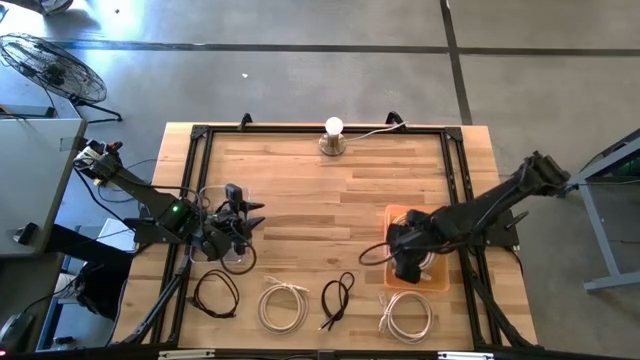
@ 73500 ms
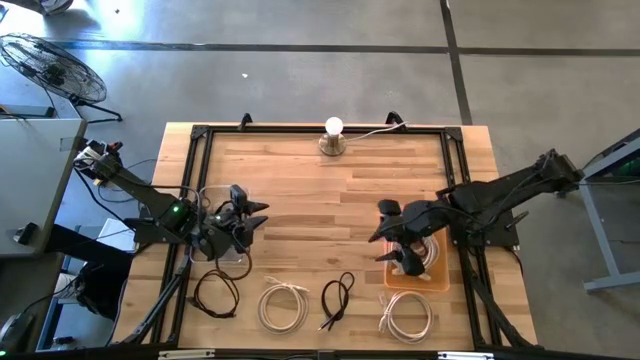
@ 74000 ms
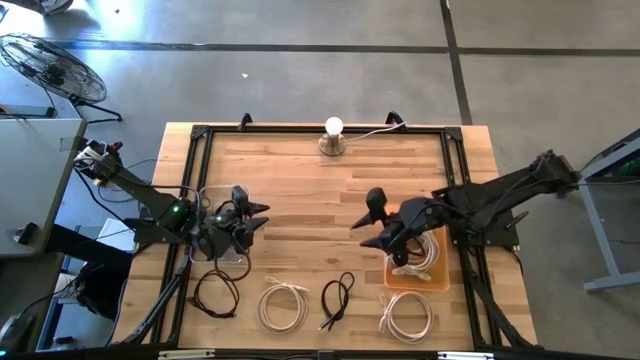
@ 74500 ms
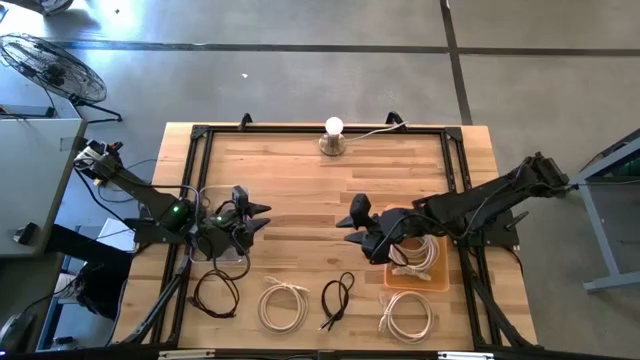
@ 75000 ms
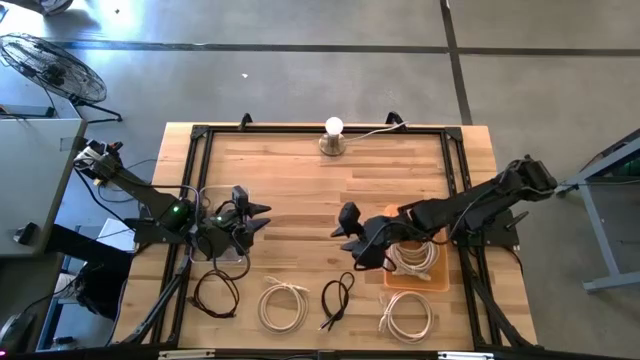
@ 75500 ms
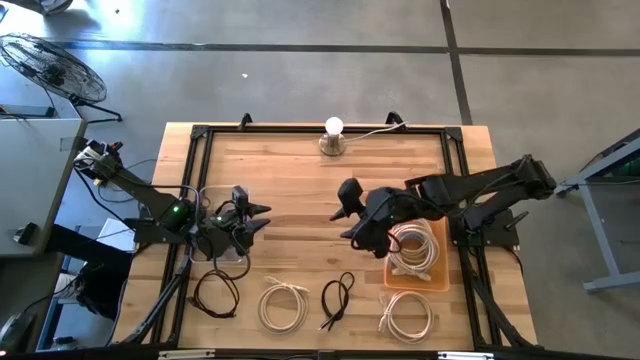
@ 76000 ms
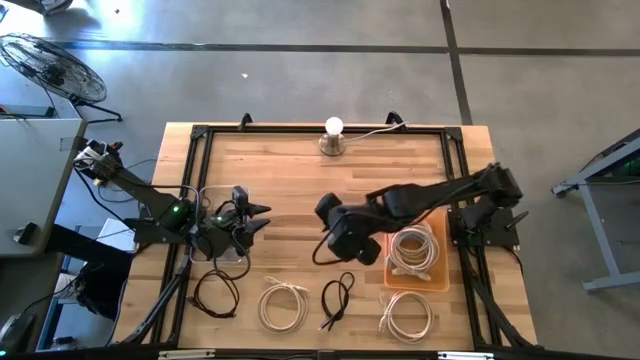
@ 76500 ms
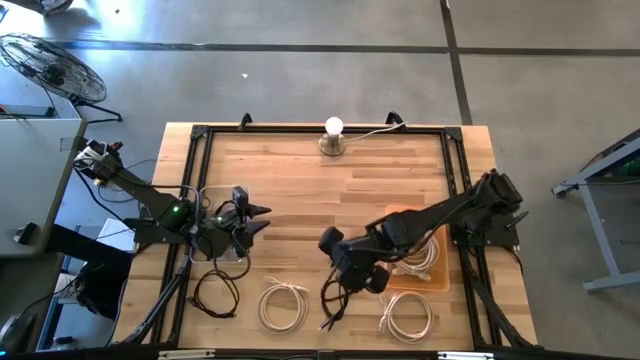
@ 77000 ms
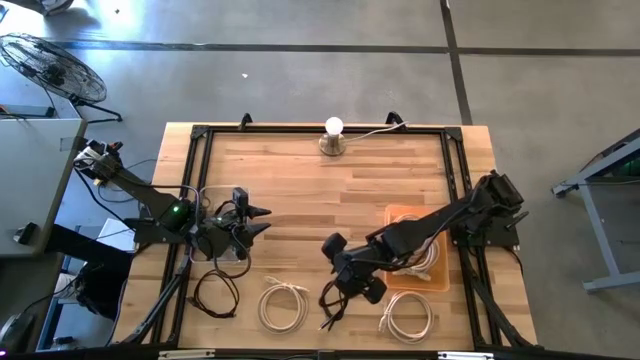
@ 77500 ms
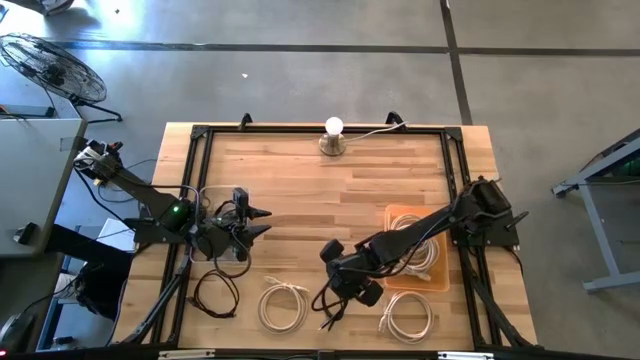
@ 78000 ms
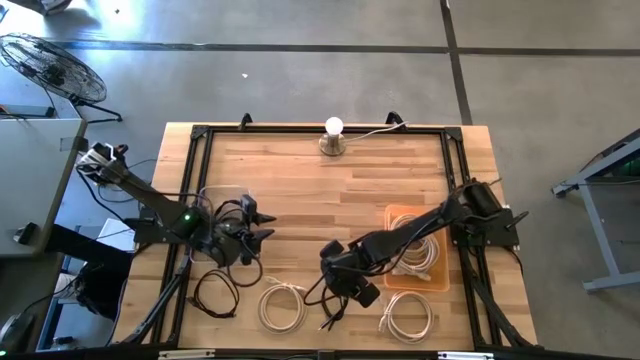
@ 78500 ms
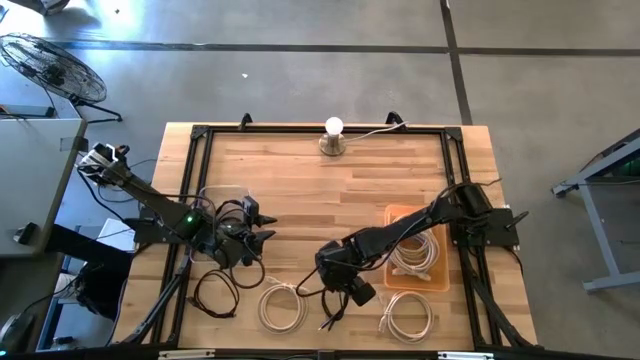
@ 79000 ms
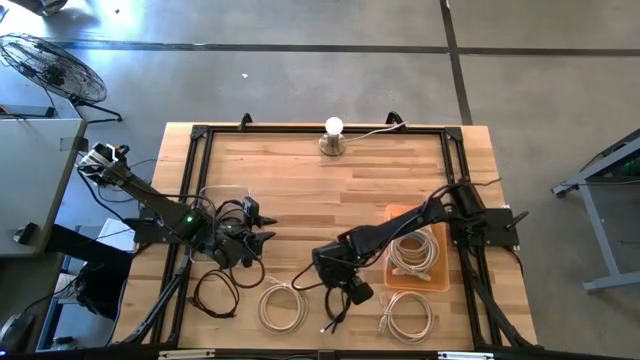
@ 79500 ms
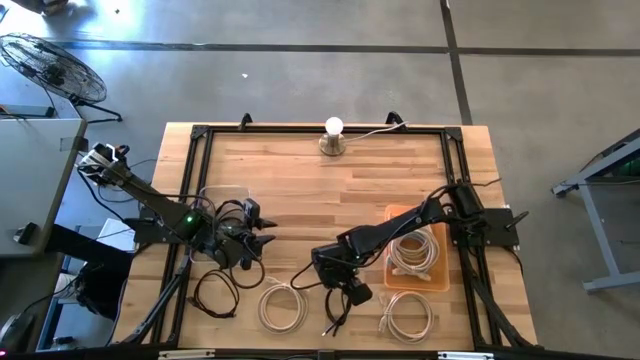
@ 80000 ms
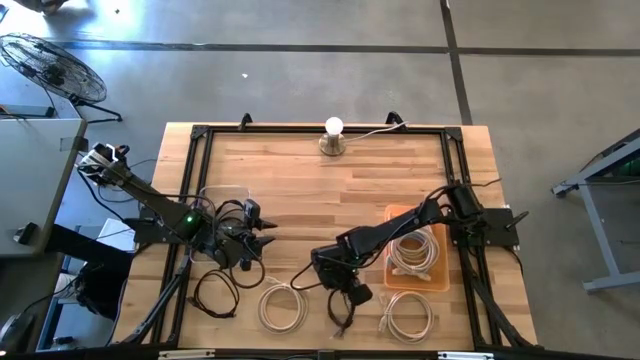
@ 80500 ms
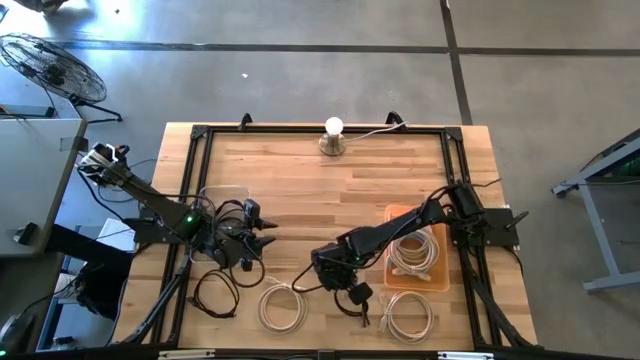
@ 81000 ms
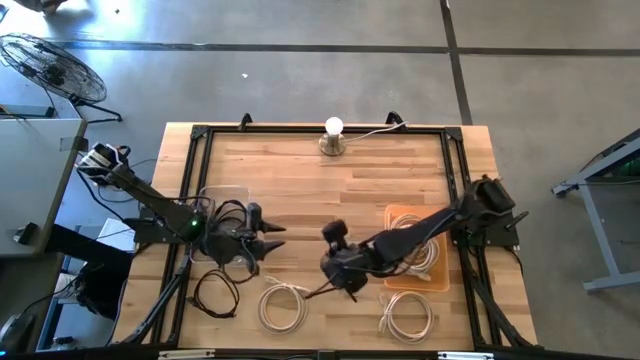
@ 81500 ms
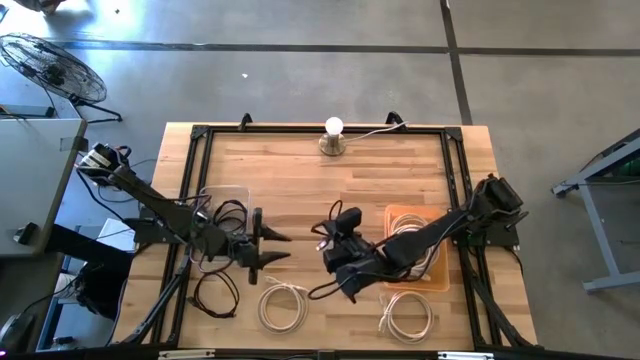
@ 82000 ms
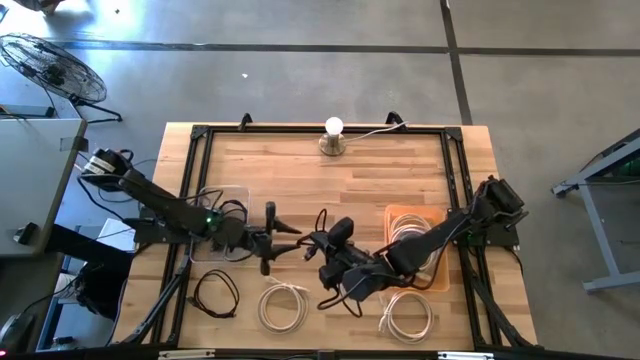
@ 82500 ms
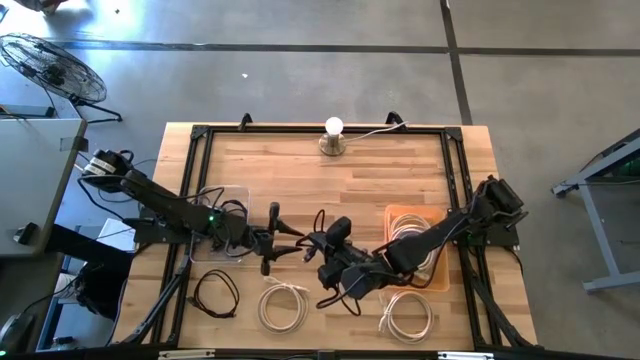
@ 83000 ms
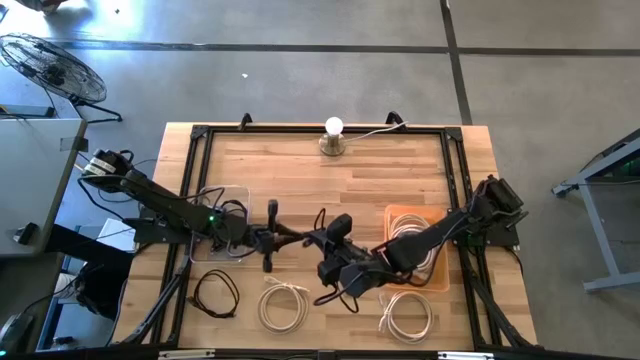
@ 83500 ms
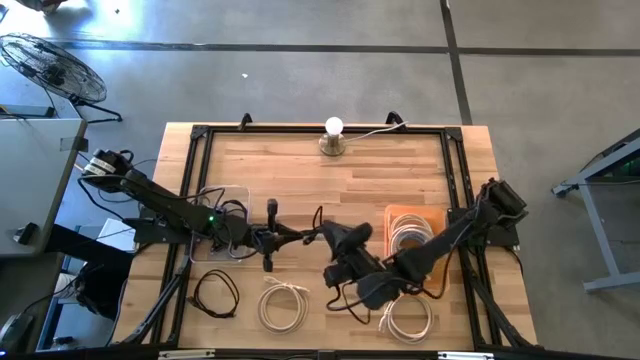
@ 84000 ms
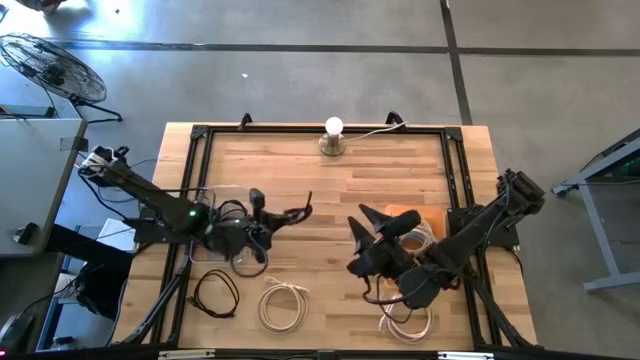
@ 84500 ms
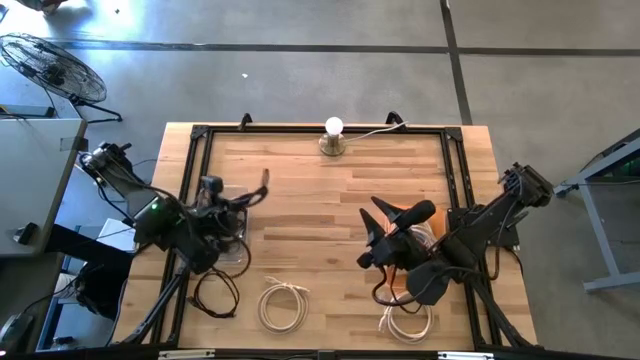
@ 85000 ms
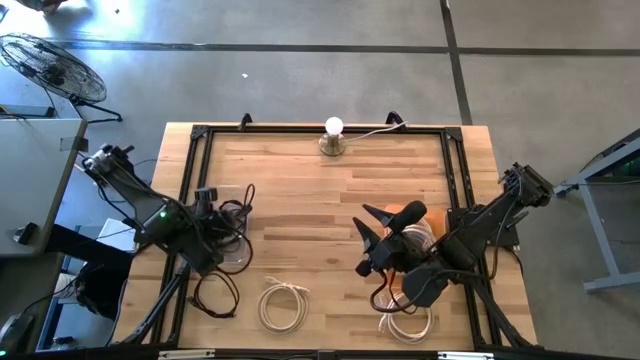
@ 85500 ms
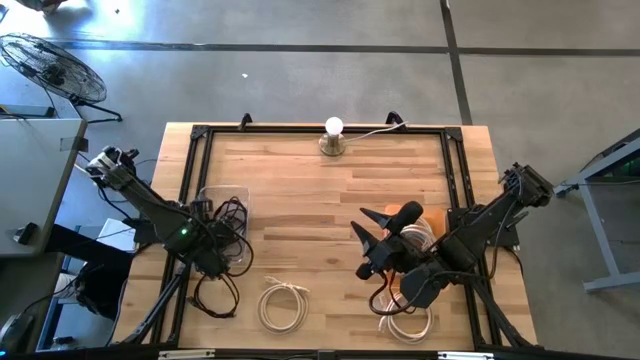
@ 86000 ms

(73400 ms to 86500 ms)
Task: Pick & Place USB Port
Put the black USB cable into the transparent bin

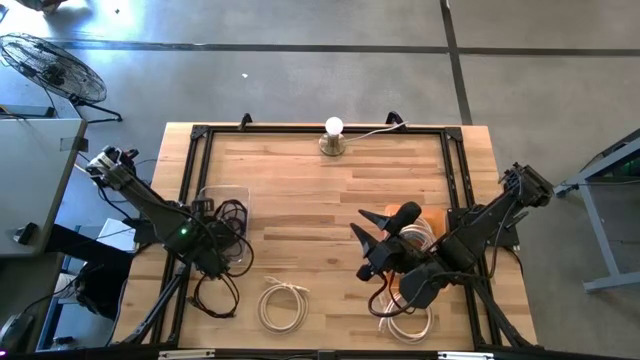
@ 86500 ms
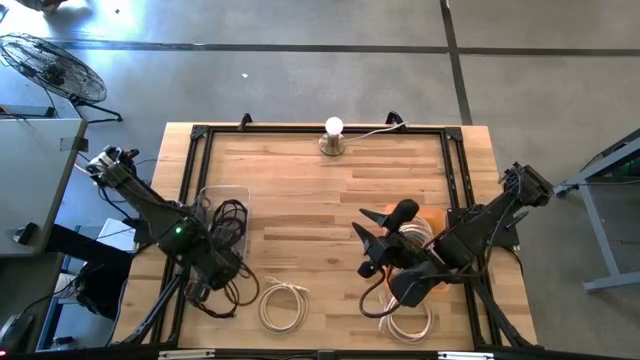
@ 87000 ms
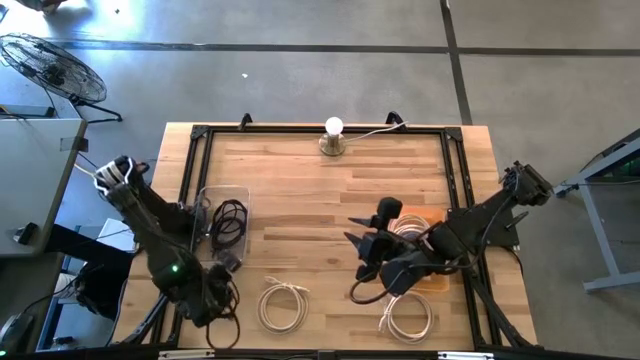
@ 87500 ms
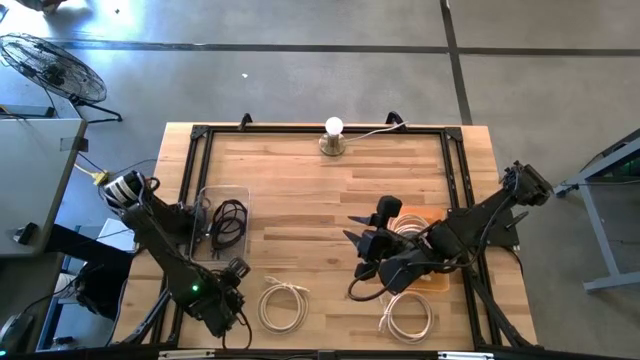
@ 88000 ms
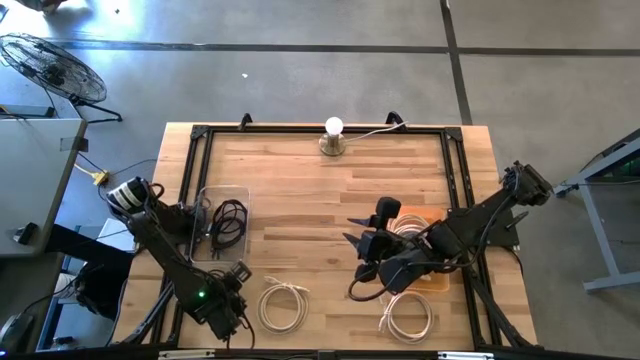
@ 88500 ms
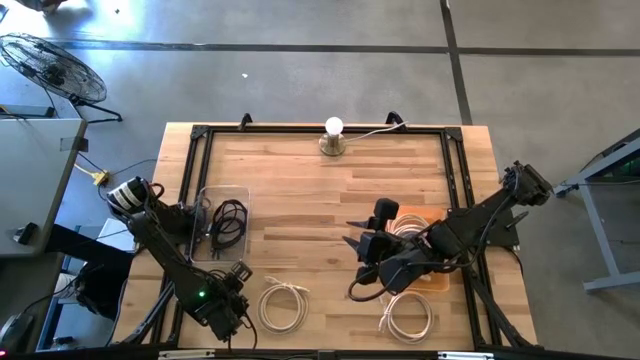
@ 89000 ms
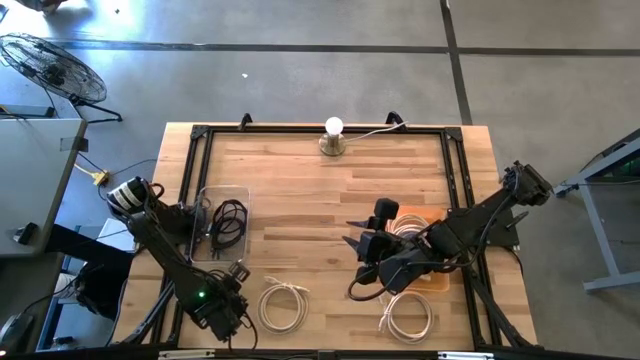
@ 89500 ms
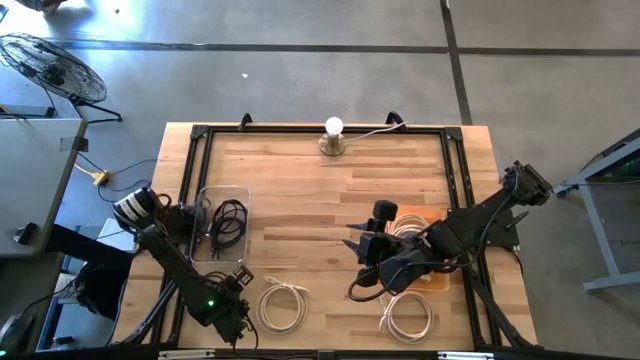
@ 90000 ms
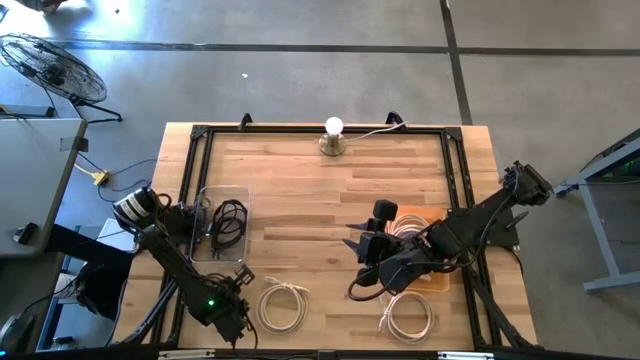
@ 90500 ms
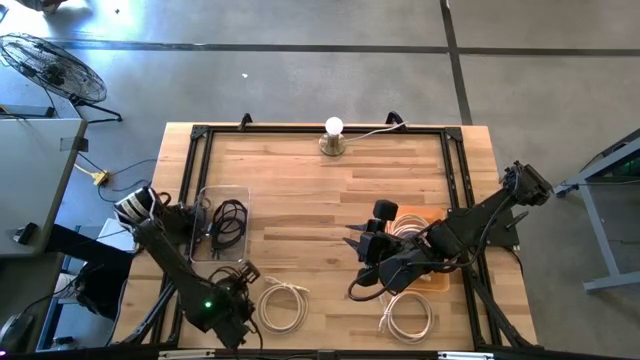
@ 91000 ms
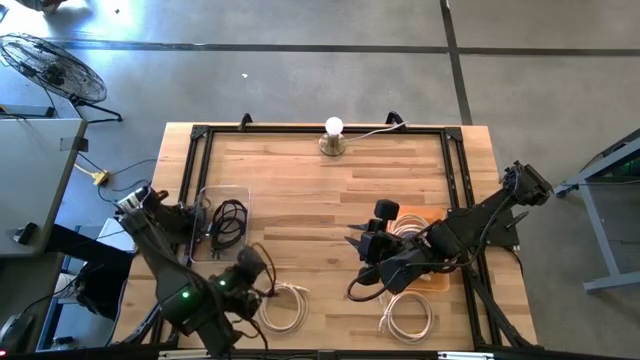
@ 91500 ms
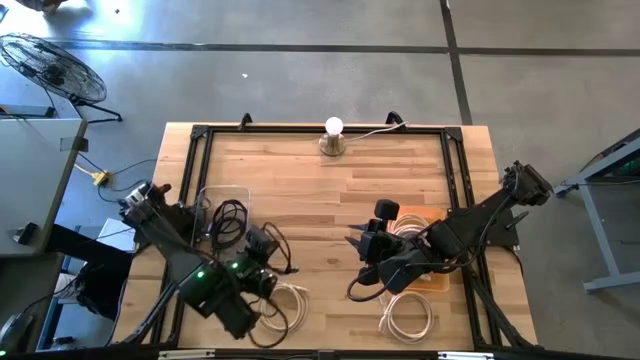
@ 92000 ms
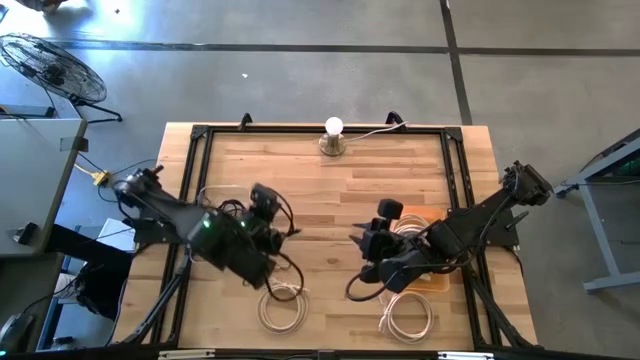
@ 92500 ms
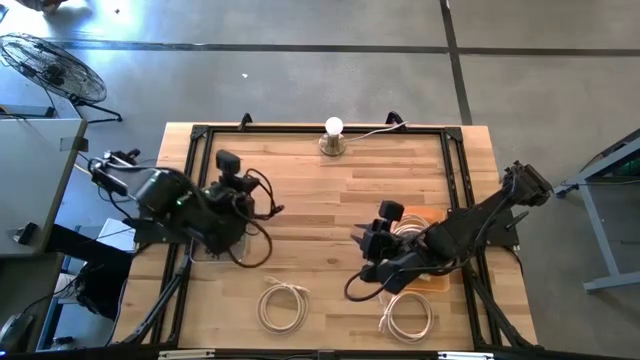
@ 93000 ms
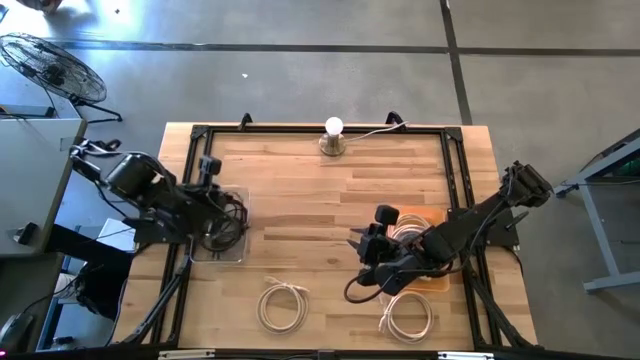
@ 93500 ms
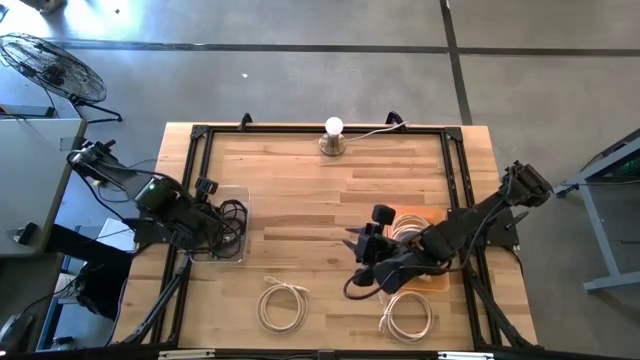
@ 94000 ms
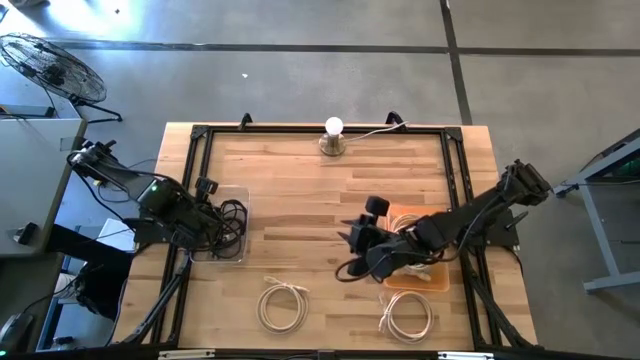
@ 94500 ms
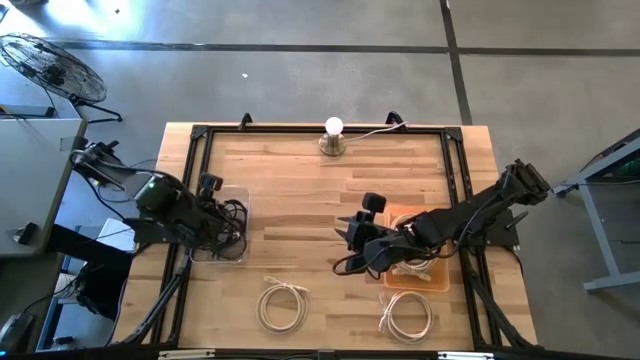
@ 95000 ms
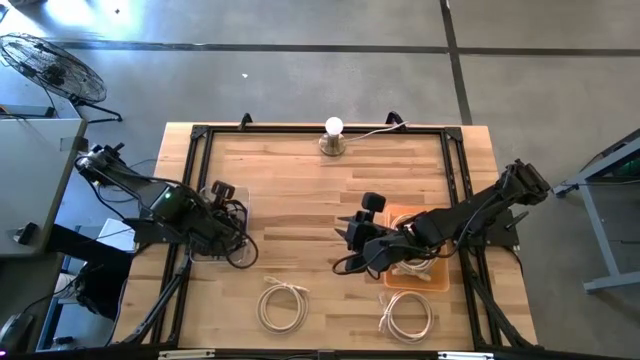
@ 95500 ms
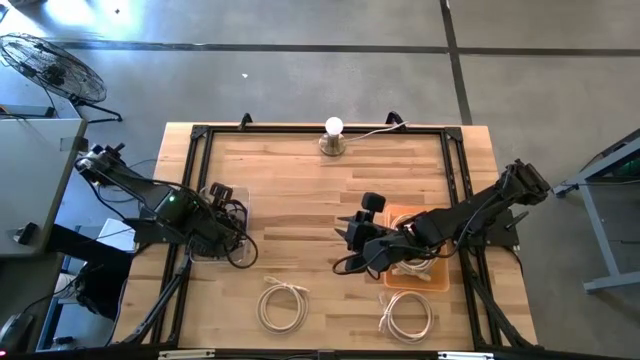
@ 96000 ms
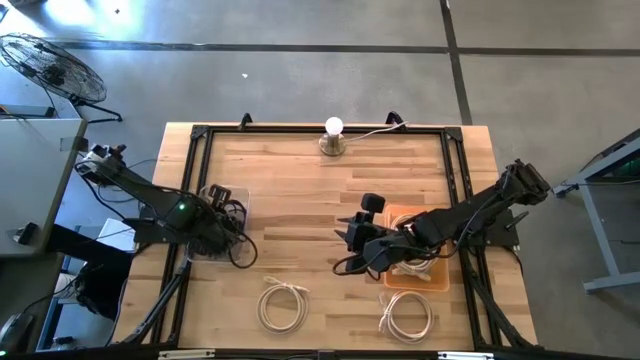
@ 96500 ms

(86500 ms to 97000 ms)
Put the black USB cable into the transparent bin
